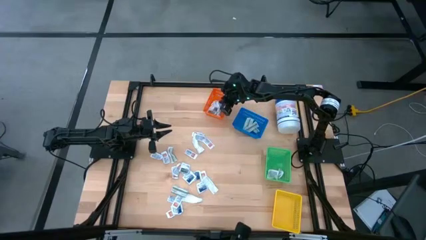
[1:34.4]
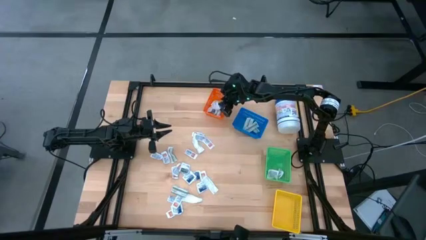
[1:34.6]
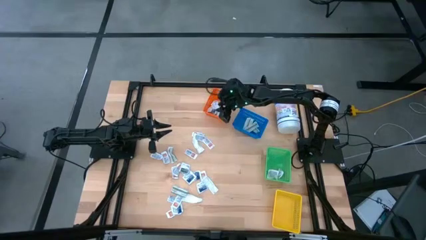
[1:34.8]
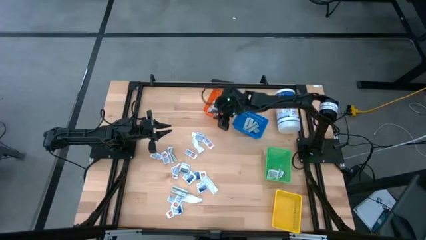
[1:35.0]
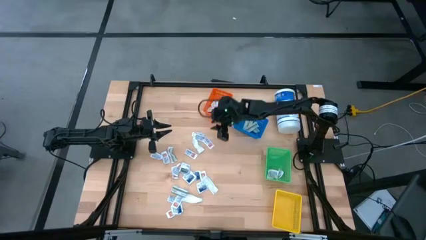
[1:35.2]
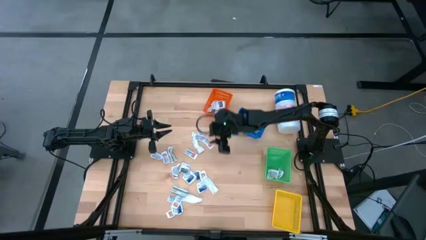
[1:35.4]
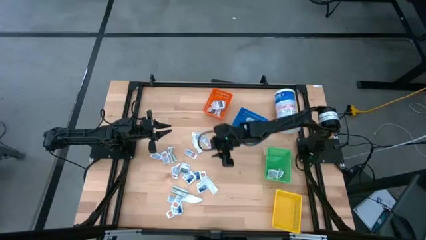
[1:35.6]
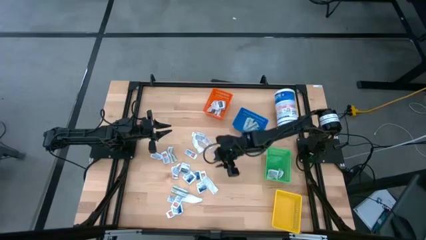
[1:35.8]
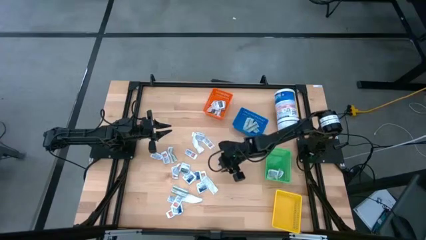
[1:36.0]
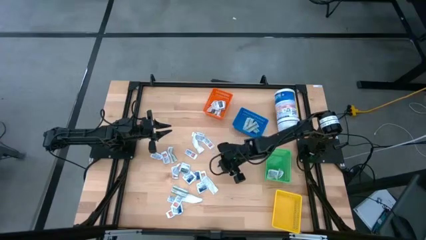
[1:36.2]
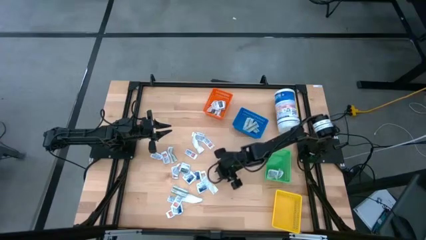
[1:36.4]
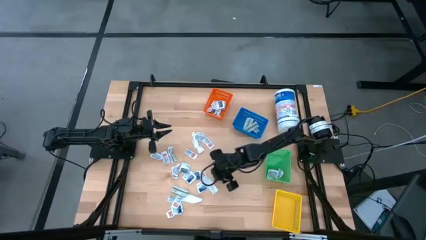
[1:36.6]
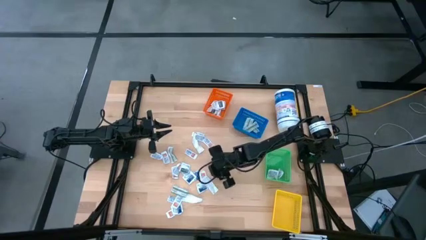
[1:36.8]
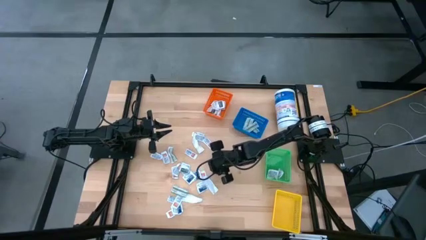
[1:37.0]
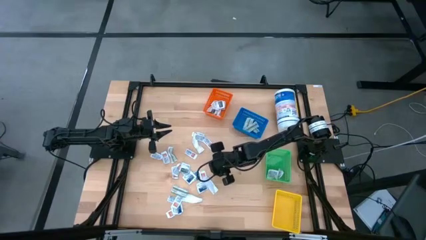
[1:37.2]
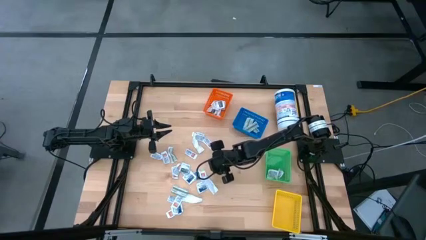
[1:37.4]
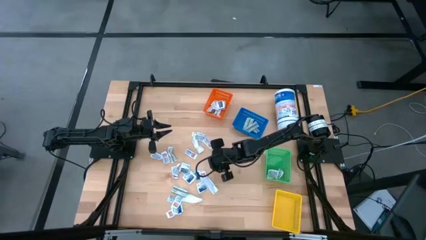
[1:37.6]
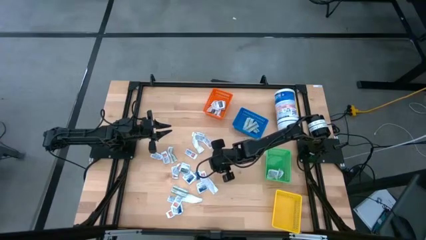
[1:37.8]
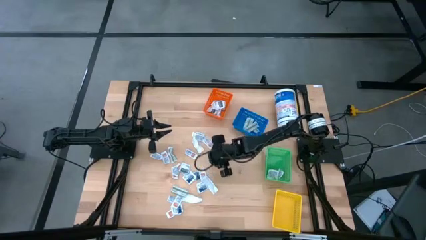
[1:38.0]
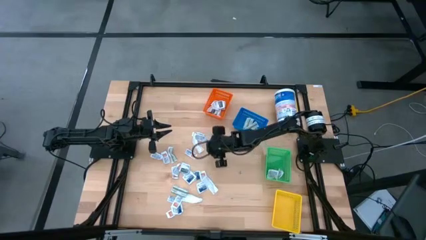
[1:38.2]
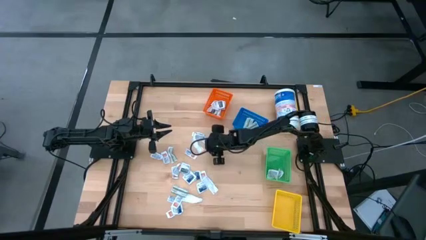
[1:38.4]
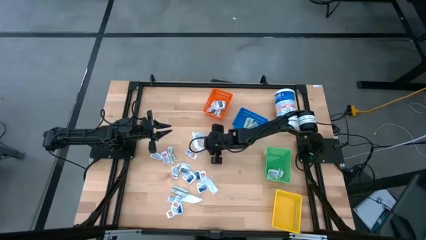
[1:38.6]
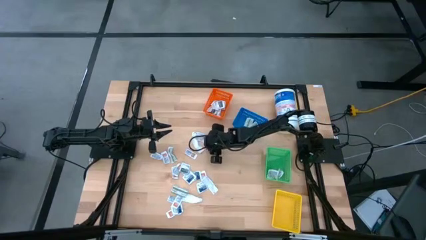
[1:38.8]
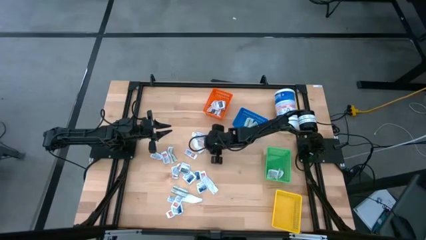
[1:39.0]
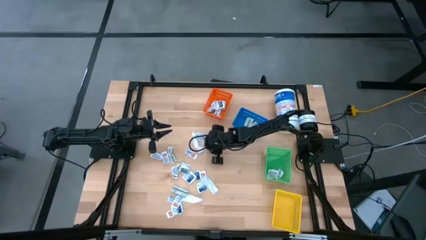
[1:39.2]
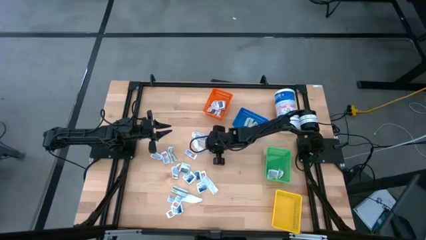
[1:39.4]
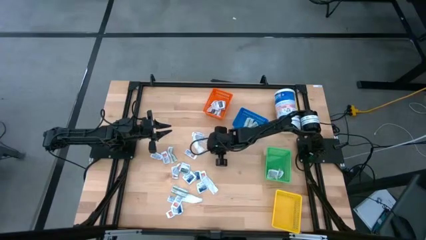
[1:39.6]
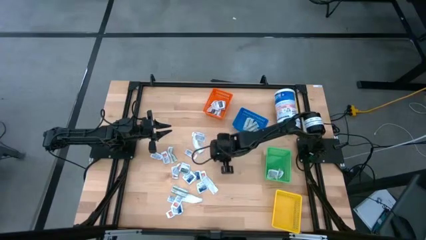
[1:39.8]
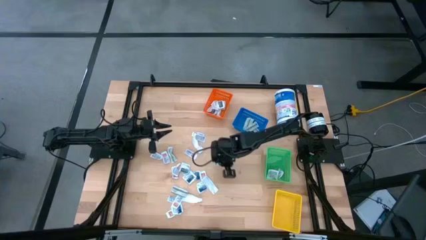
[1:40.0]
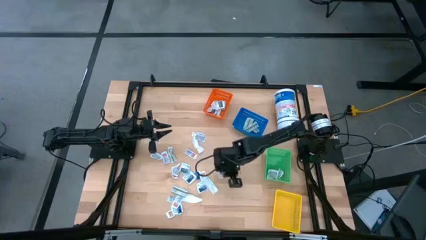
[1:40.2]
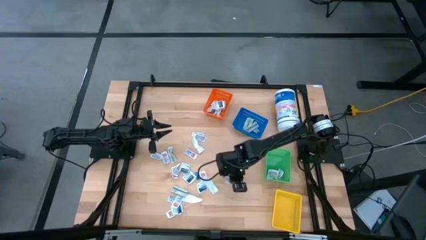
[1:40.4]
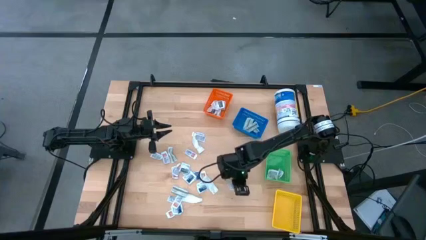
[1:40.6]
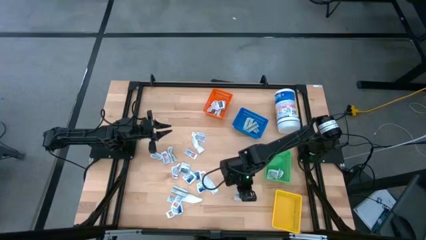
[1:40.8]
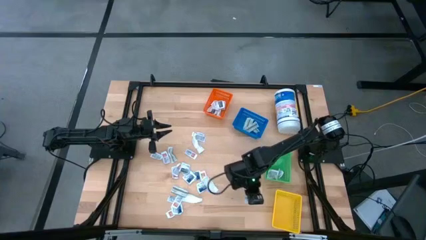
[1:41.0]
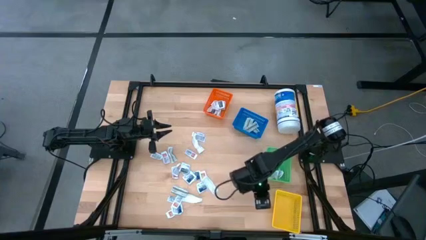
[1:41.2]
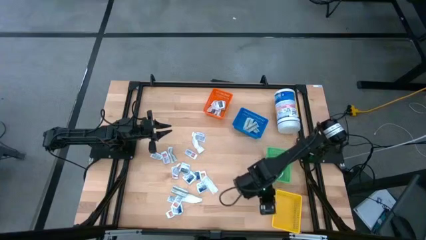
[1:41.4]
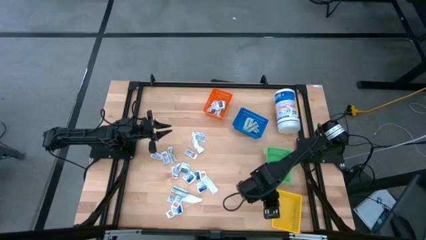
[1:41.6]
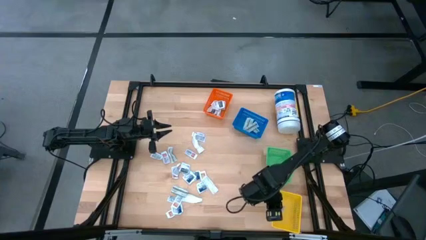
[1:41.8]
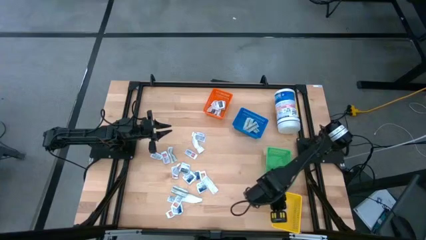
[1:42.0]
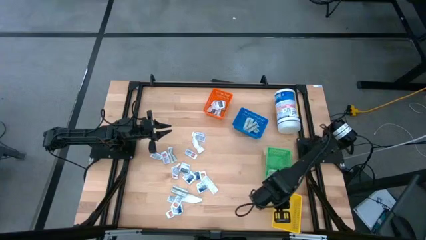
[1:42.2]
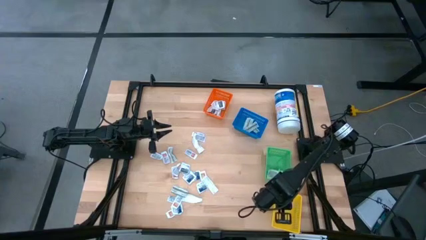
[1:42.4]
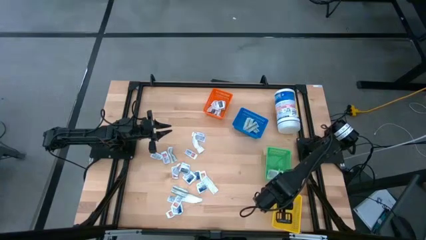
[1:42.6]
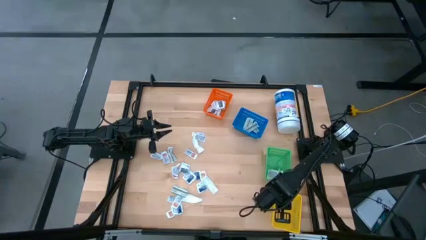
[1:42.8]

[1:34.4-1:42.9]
Task: Pick & Place First Aid Supplies
Put the orange ointment pack into the yellow basket

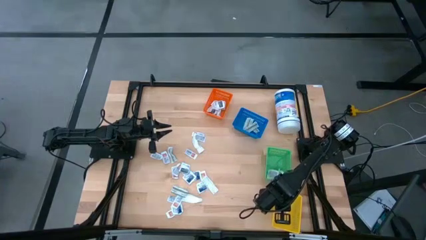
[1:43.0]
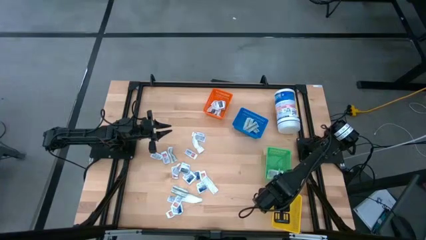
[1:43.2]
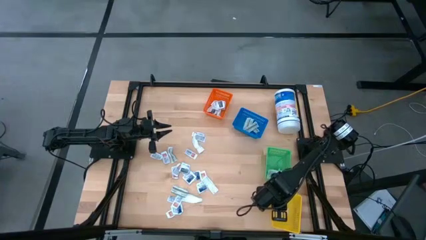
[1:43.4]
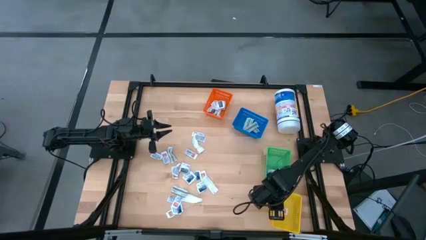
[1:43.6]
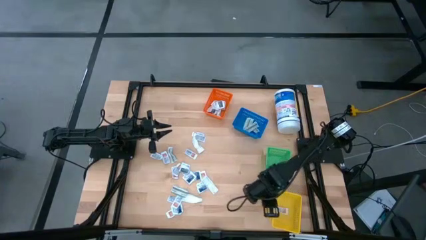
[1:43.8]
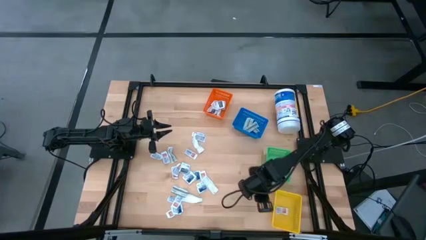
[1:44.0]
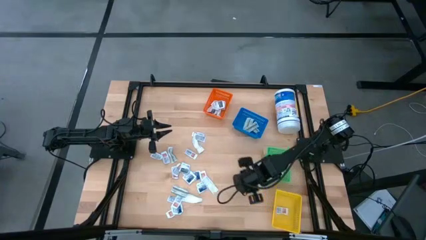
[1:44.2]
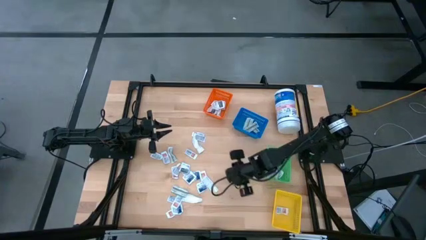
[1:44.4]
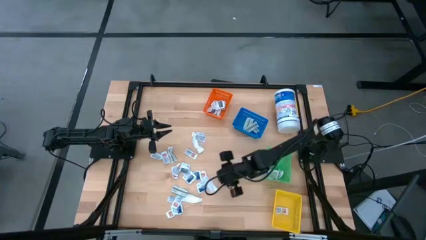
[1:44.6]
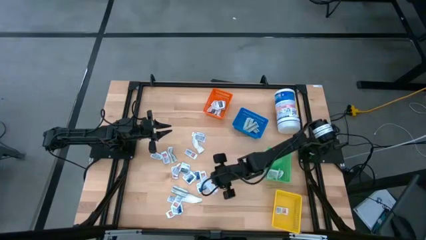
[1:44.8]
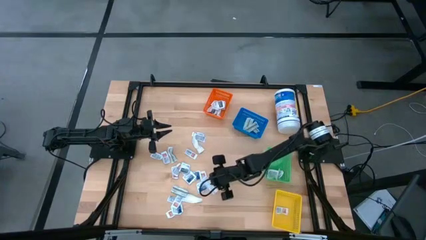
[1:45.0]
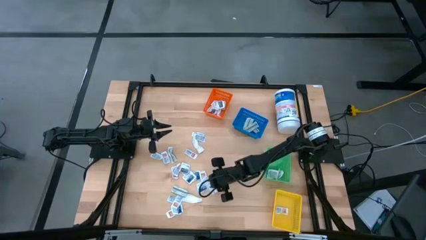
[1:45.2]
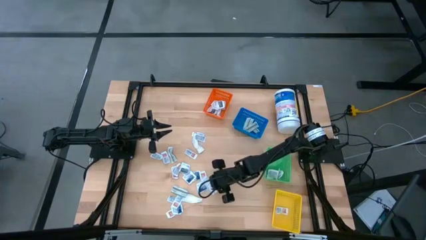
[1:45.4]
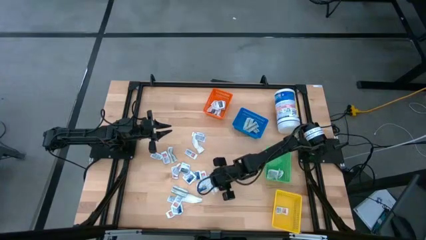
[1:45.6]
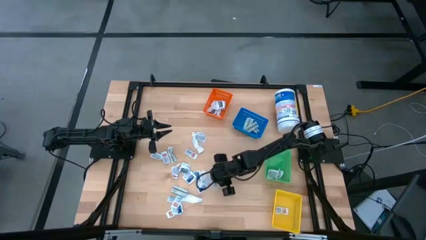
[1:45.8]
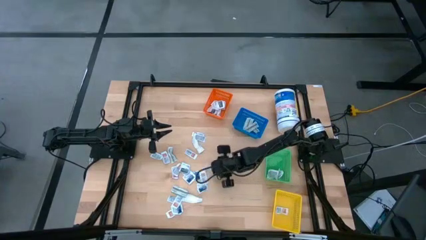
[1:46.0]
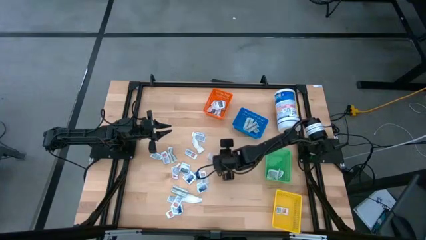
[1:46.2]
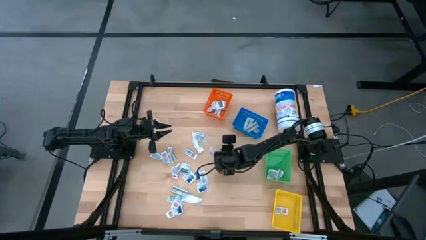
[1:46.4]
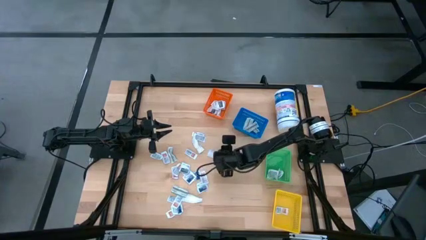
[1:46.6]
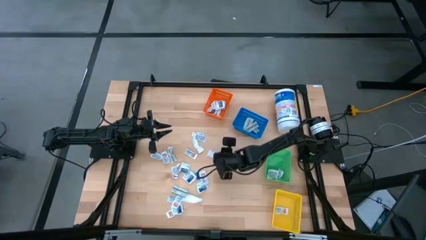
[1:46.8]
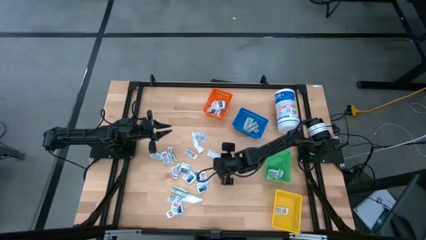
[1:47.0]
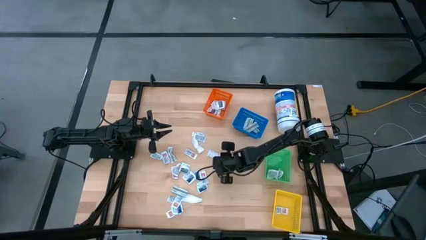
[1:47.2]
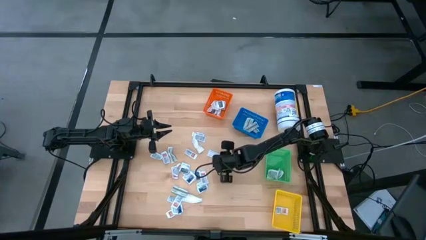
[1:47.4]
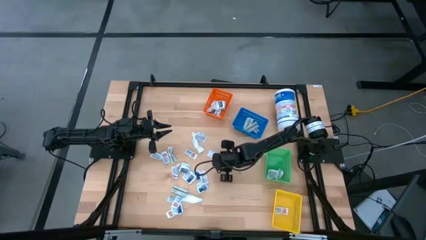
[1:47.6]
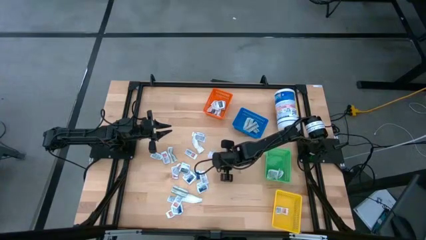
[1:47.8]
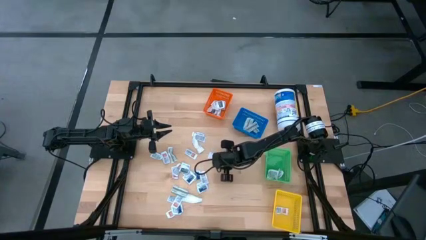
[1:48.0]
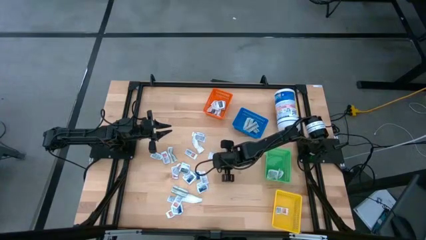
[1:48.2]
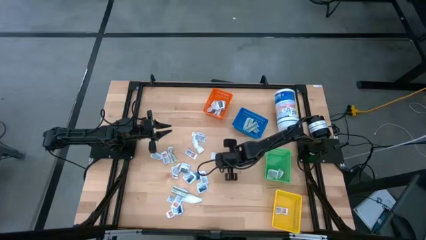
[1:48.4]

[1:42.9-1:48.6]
Put the green bandage pack into the blue basket

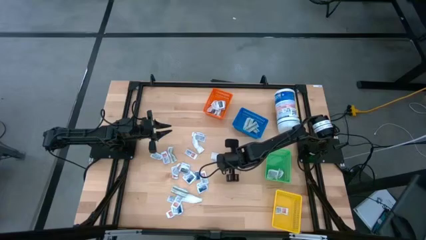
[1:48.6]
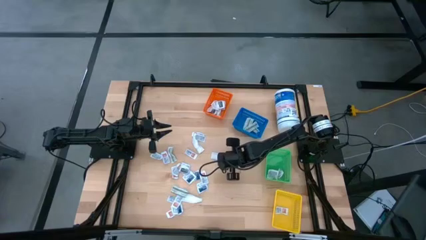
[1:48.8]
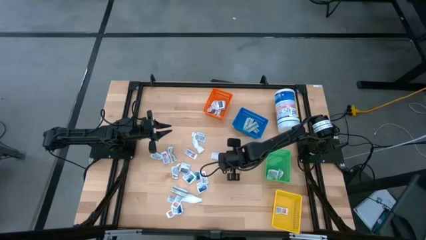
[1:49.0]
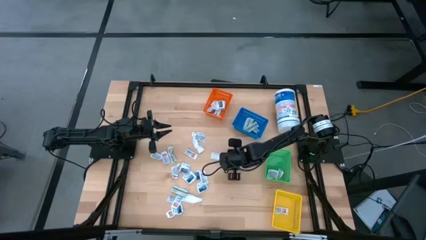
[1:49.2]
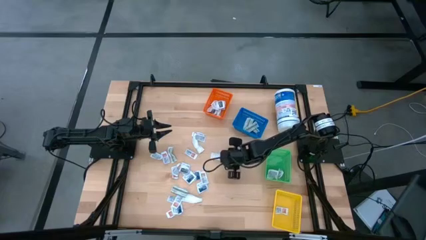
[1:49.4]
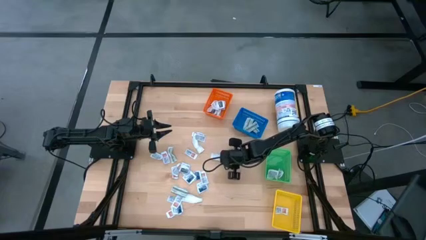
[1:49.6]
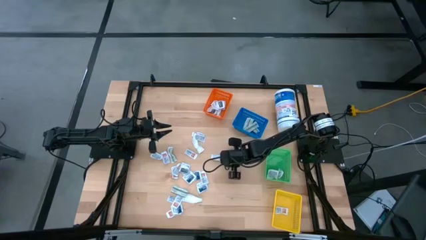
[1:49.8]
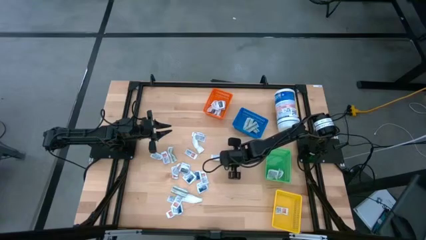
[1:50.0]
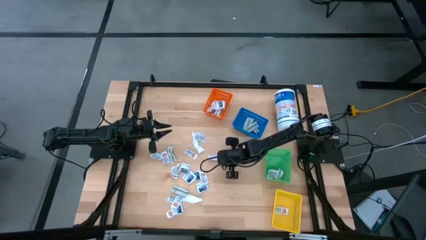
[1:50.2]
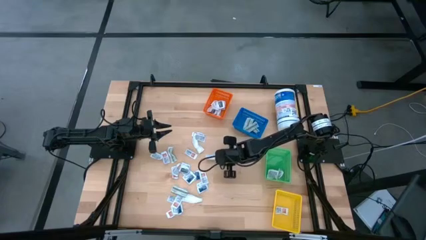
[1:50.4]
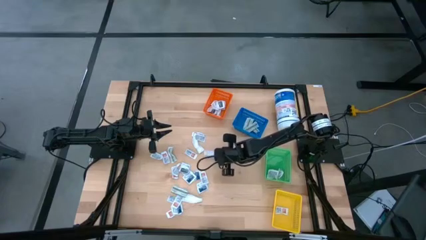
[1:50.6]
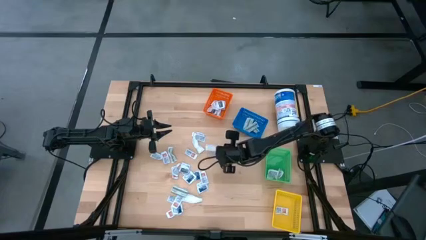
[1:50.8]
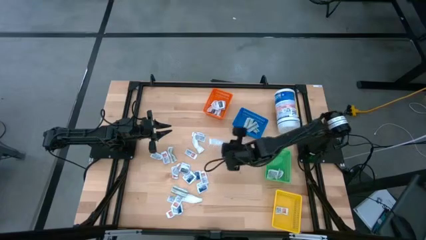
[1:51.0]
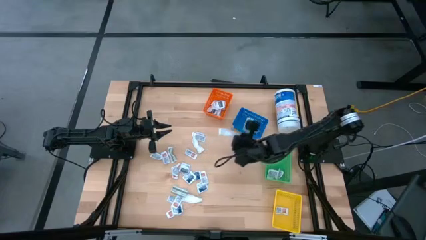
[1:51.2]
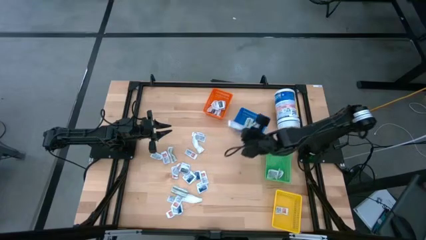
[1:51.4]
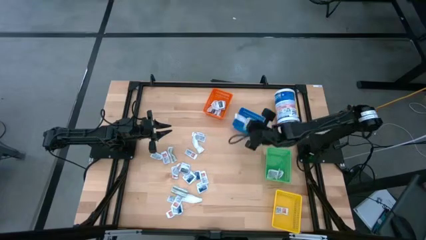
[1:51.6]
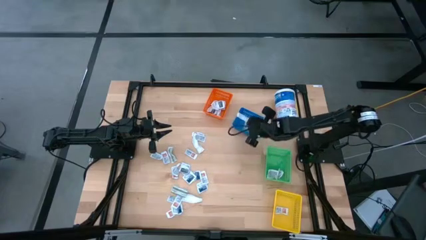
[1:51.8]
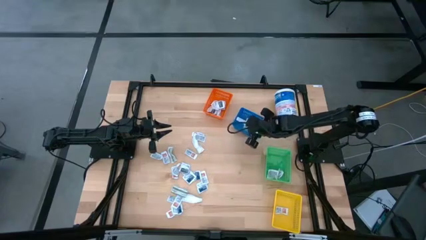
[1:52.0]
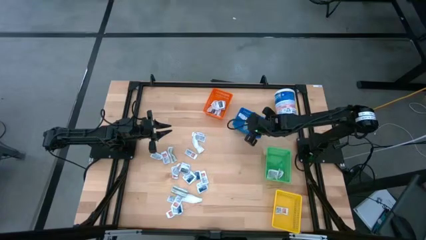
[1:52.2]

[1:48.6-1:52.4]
Put the green bandage pack into the blue basket
